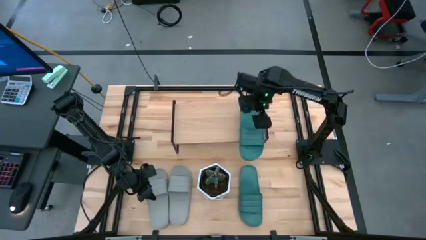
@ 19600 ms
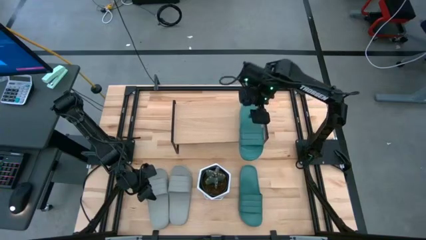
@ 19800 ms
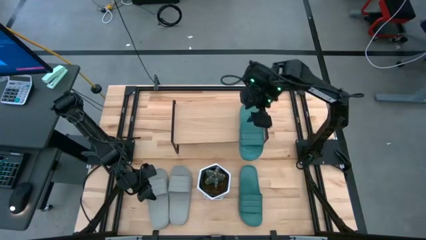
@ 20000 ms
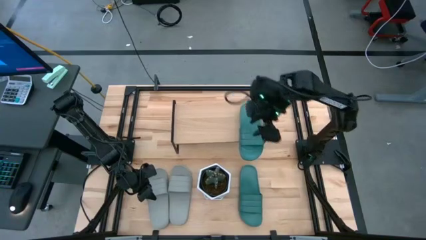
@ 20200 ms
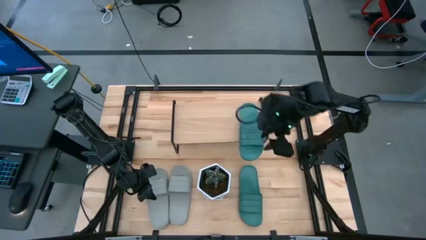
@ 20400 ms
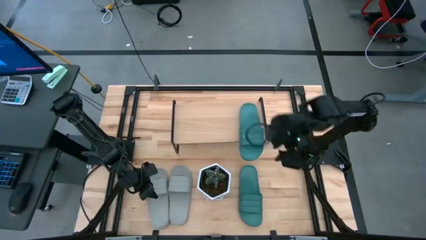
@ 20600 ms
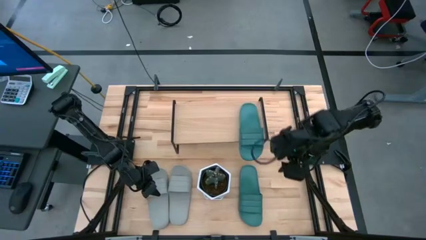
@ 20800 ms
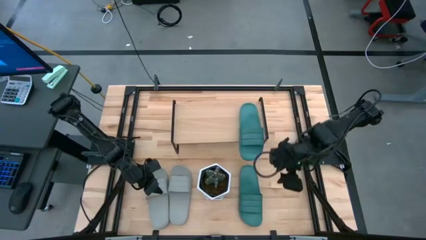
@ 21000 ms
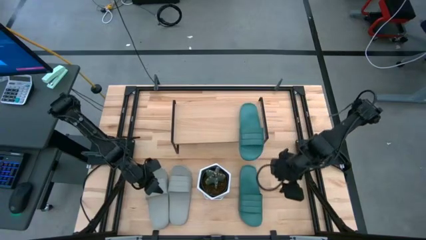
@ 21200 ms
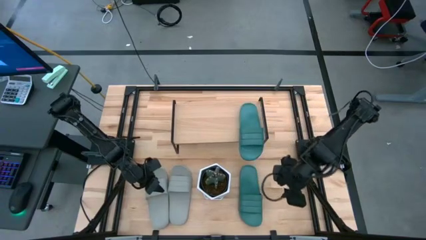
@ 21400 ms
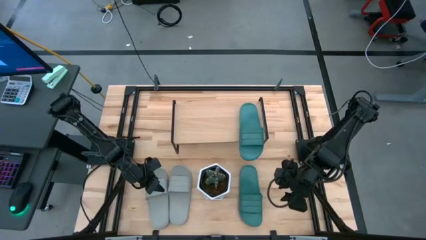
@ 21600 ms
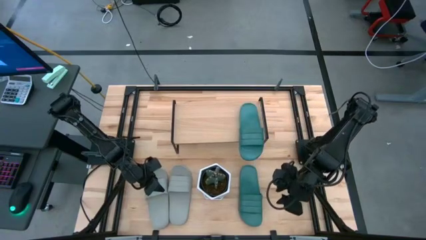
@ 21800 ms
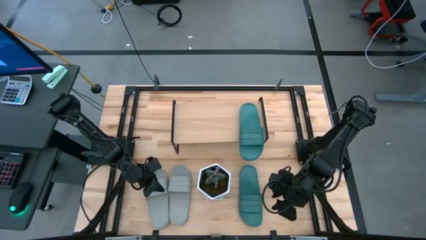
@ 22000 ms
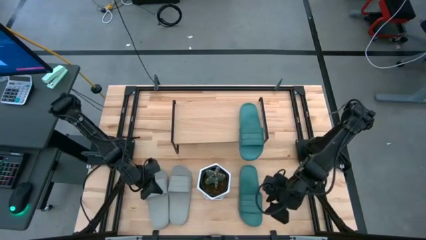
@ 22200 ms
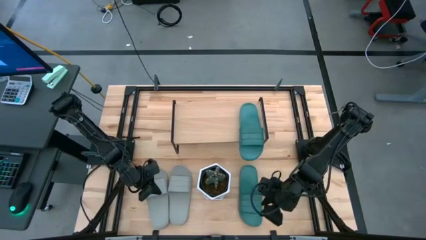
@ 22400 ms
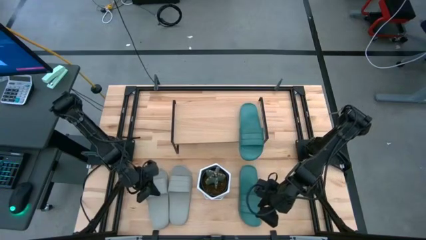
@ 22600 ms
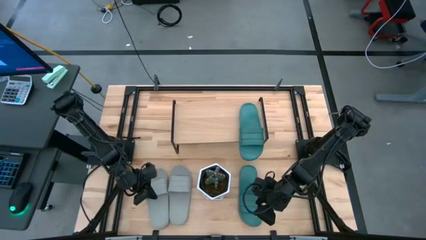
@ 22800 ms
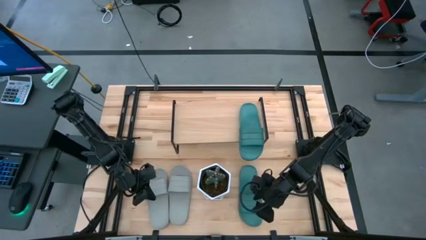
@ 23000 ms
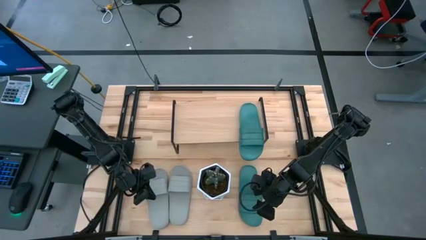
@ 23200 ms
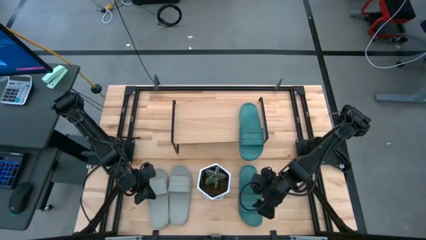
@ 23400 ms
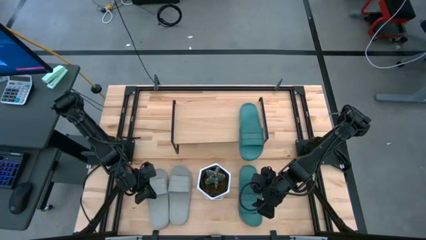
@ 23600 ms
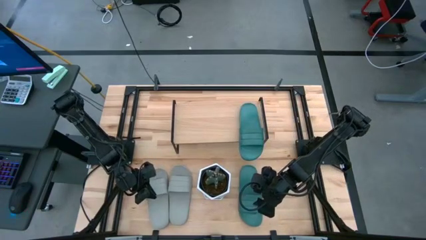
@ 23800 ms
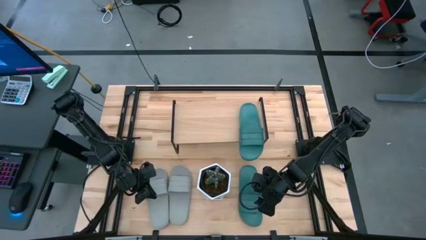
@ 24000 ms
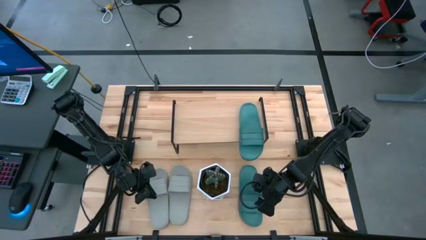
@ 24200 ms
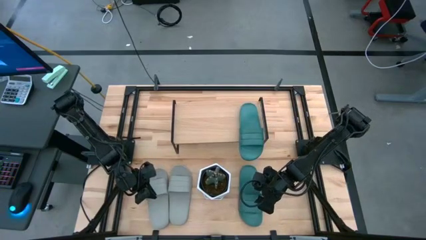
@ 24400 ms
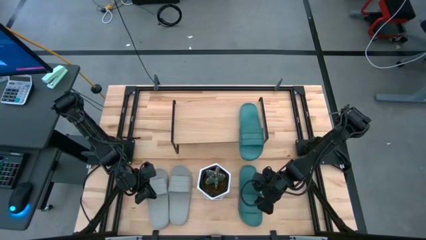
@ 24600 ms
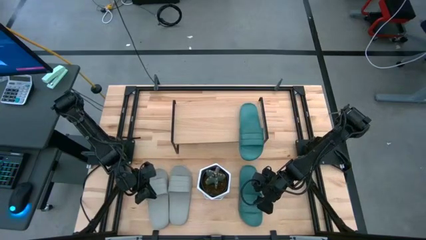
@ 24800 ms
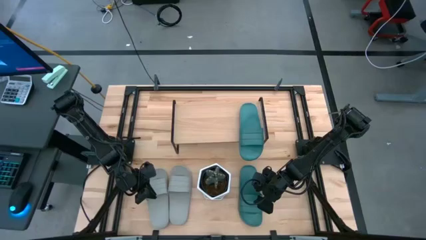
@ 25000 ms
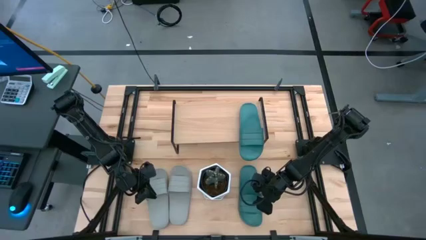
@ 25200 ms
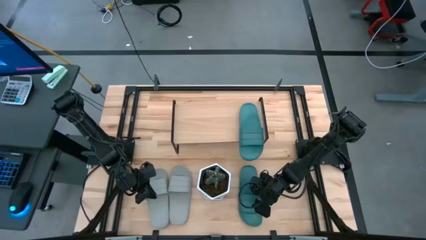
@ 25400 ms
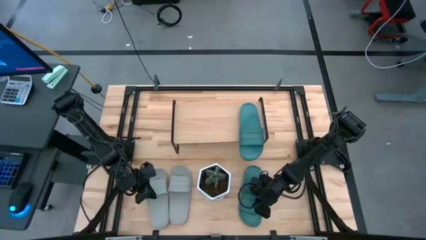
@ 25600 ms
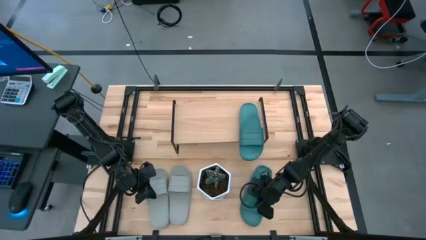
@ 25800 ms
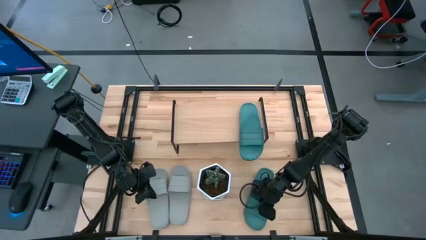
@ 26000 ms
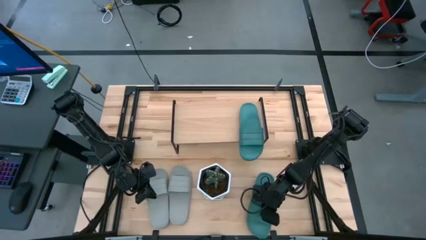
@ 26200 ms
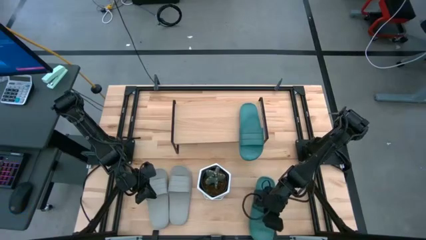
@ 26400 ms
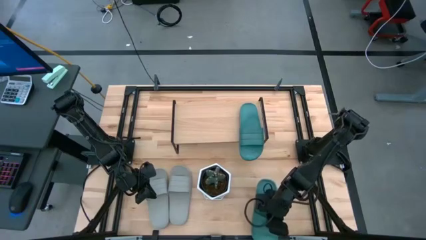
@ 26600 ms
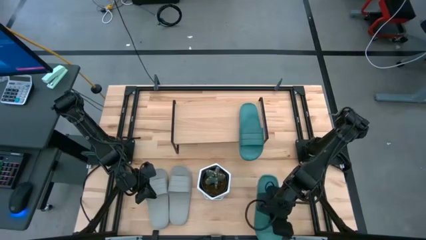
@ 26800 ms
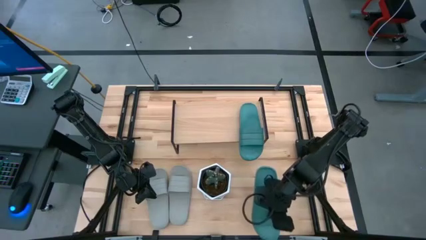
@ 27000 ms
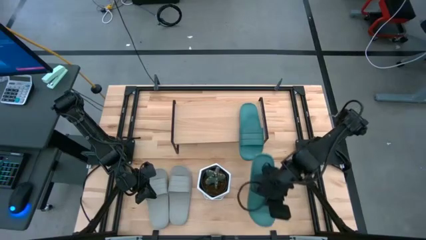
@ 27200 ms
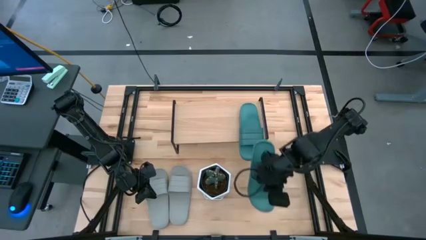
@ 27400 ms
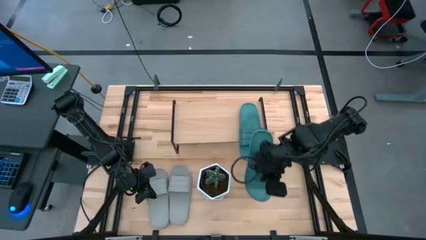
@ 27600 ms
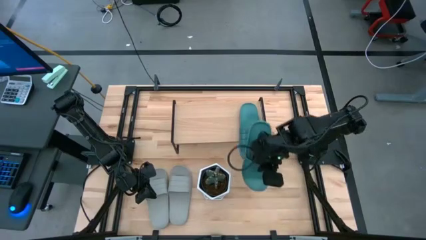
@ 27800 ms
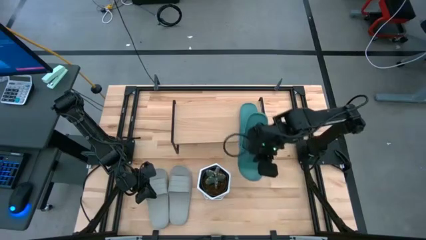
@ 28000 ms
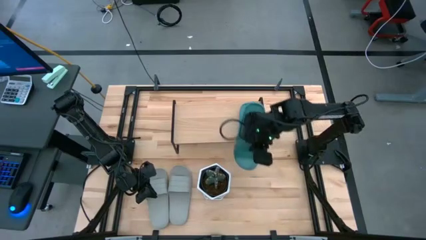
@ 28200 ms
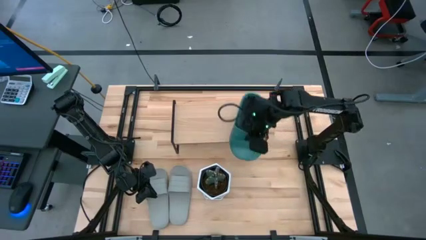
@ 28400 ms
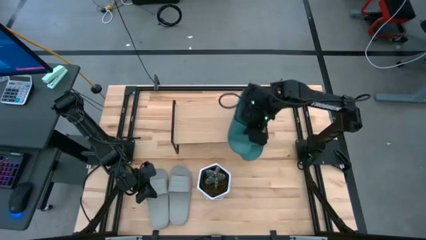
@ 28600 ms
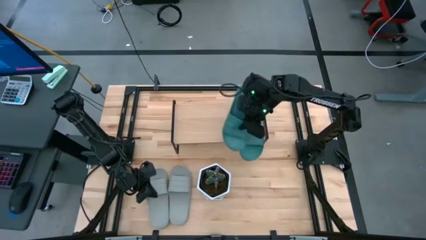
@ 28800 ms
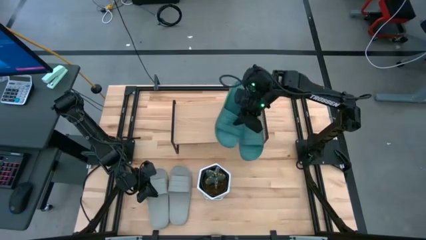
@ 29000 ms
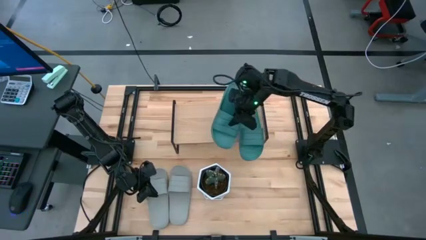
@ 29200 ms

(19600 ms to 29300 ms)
Task: Pick and place slides into the shelf
Put the green slide on the shelf

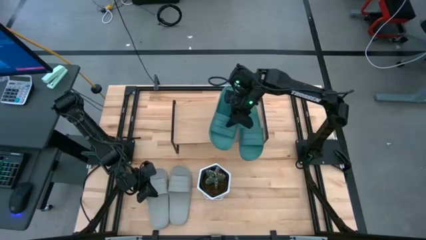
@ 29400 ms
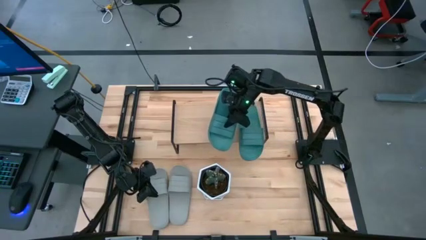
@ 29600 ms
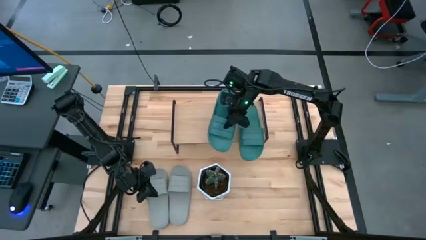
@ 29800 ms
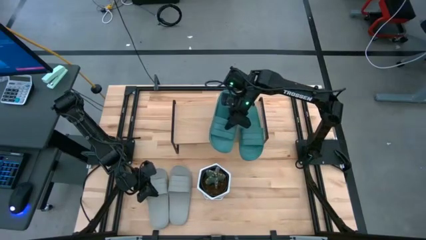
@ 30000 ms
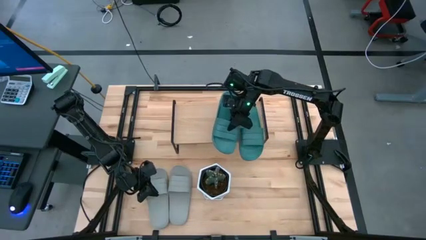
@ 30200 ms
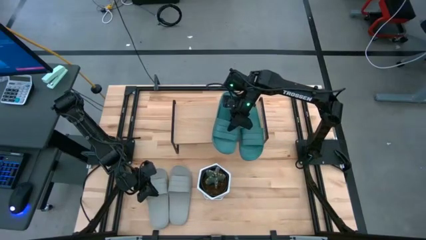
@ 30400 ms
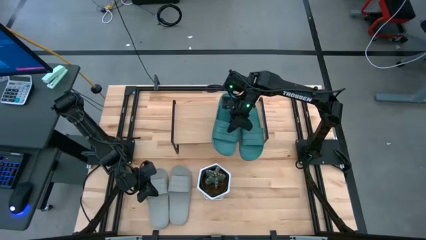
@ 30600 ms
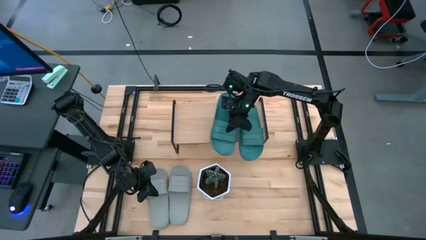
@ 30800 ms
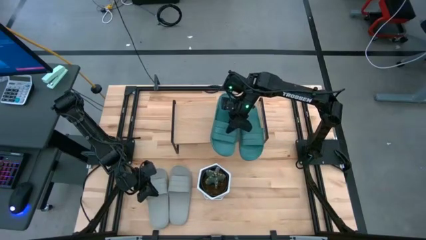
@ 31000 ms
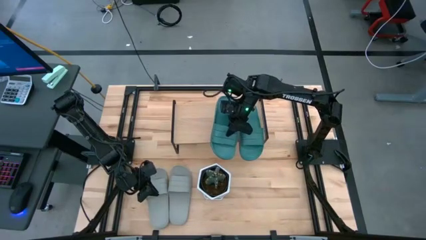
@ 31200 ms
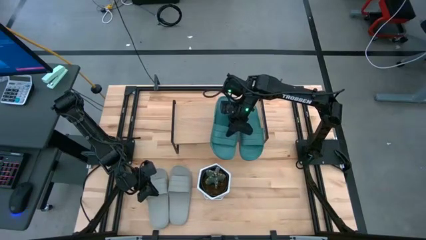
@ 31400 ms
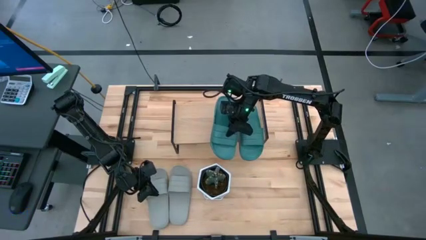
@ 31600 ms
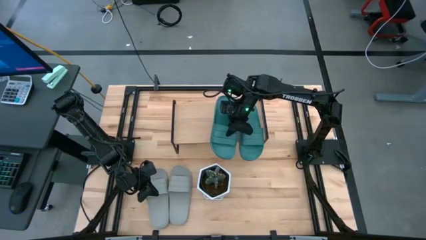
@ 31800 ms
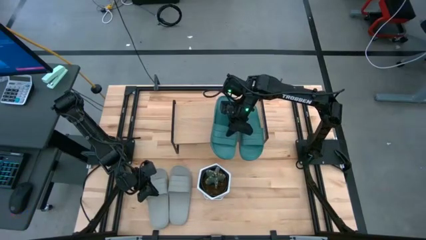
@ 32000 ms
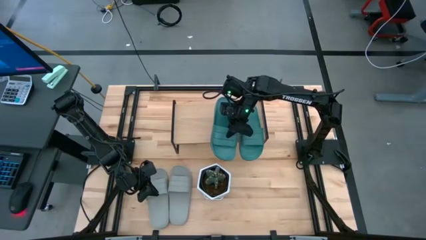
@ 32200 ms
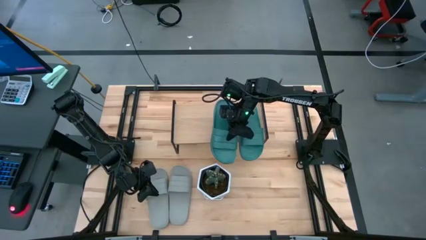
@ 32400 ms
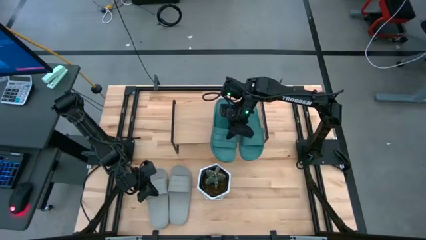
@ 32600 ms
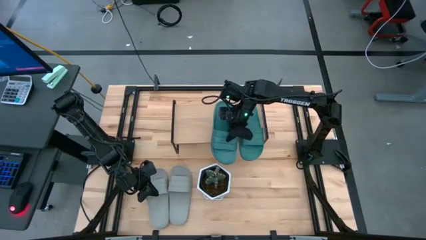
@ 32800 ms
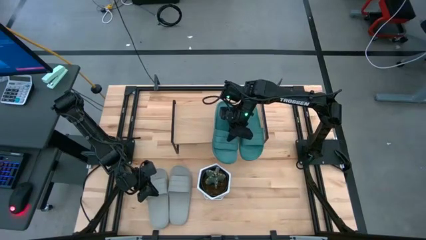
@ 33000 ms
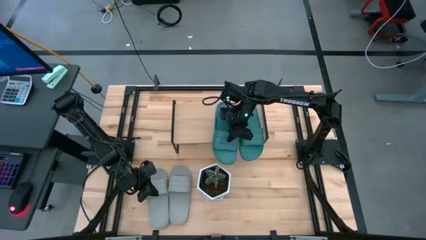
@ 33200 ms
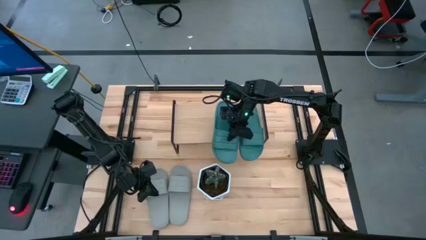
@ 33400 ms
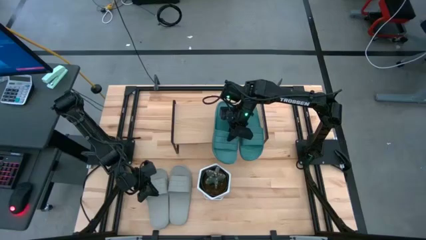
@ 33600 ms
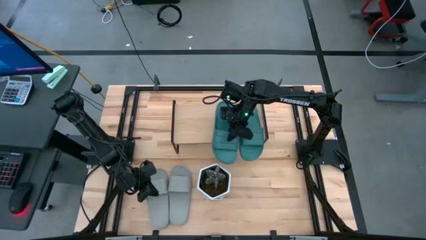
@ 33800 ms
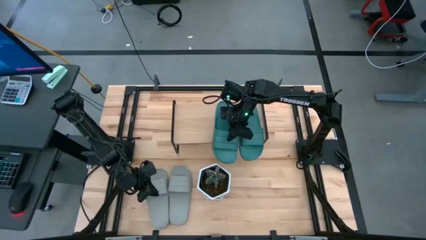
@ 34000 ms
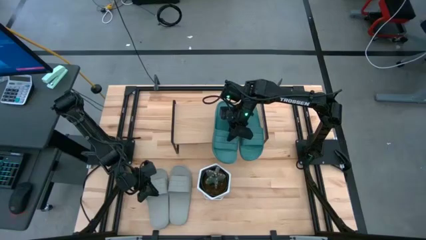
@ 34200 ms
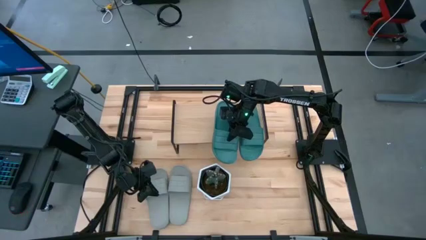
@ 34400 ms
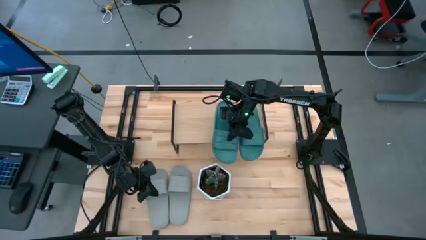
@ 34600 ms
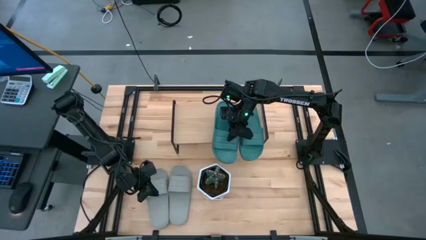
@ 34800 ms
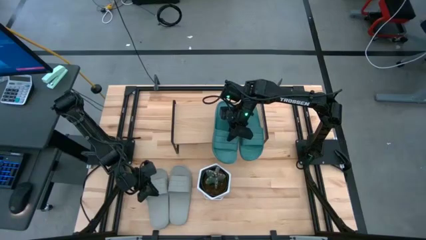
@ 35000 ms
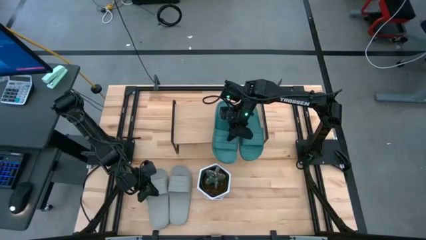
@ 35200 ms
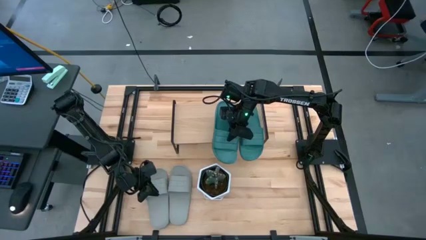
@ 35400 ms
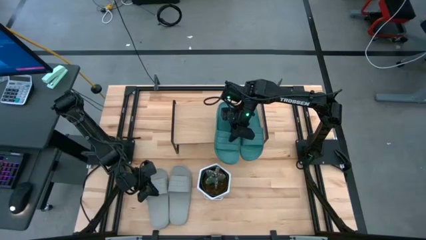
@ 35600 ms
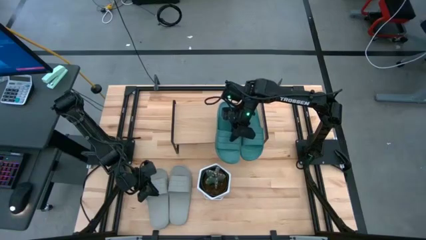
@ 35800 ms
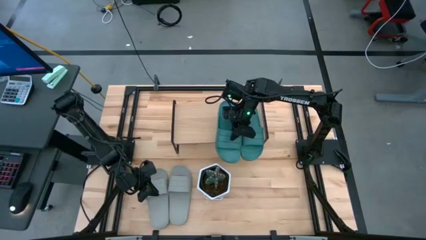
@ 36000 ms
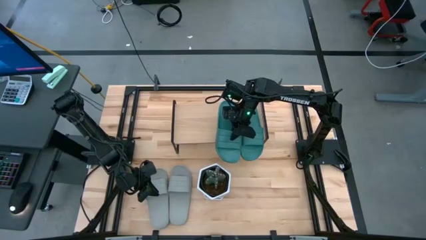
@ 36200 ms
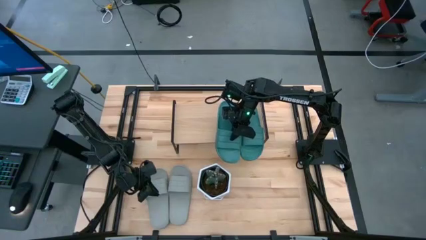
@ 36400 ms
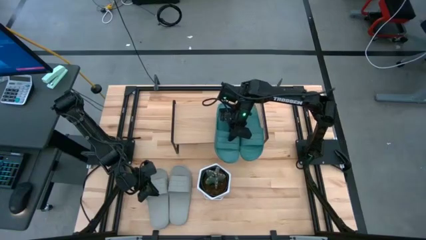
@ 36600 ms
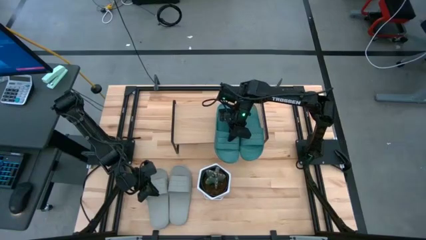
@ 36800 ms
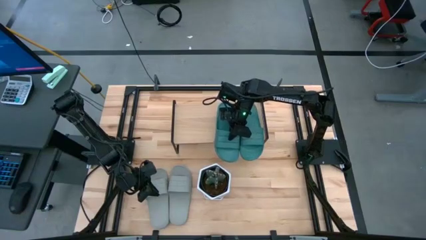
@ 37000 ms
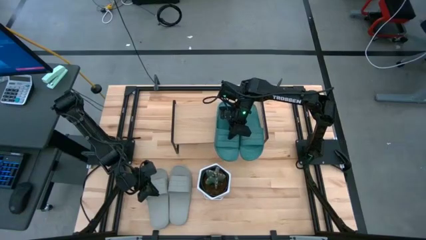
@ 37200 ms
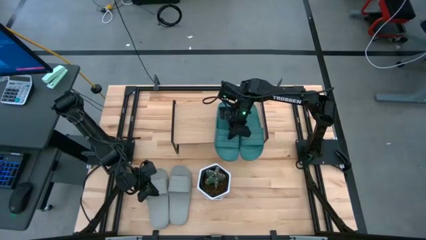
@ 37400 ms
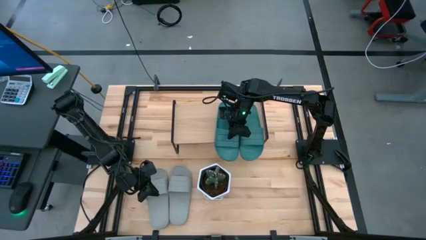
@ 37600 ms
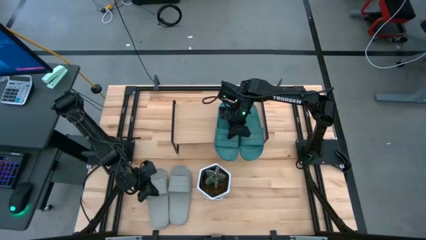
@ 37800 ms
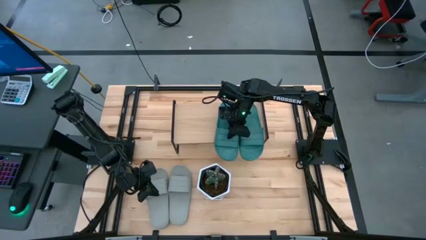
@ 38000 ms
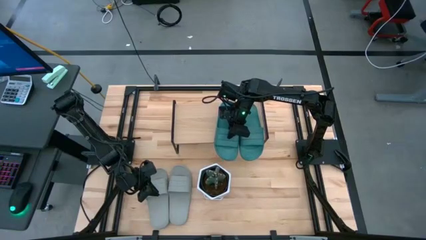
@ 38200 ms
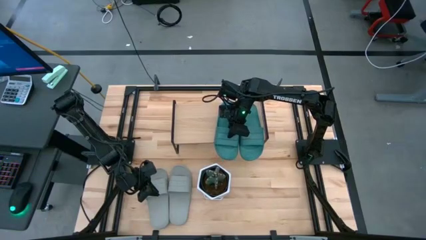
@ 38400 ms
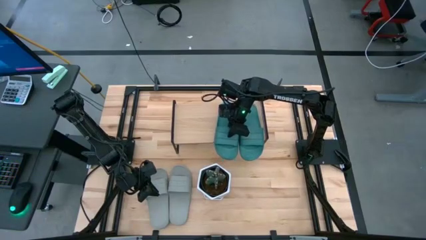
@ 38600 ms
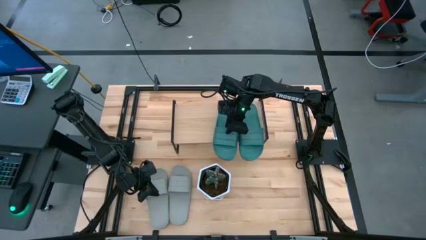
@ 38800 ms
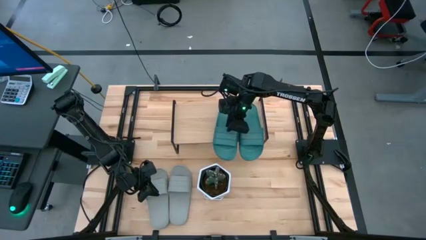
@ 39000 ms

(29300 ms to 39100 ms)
Put the green slide on the shelf
